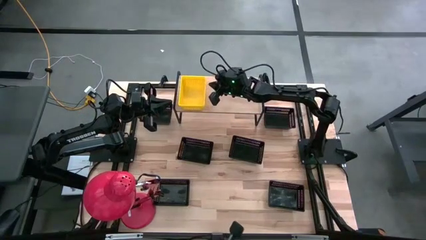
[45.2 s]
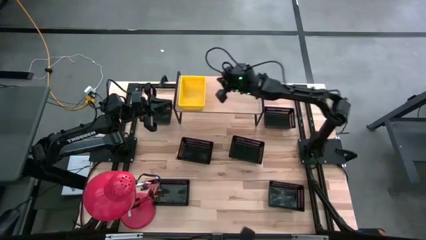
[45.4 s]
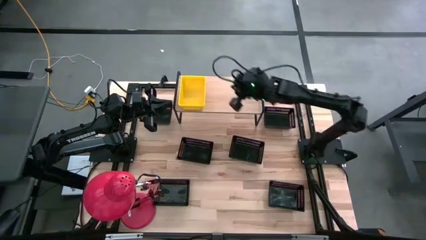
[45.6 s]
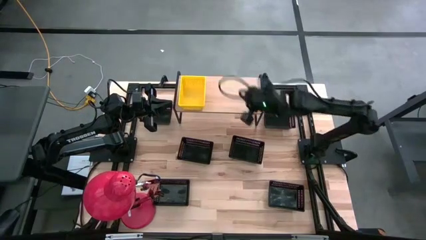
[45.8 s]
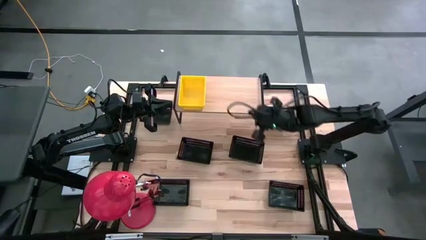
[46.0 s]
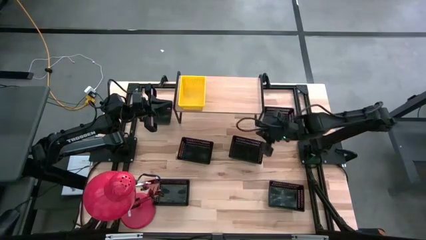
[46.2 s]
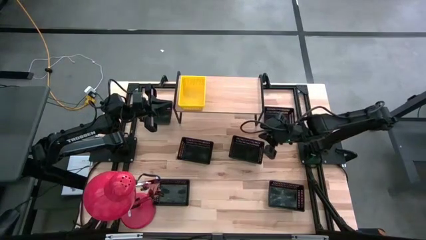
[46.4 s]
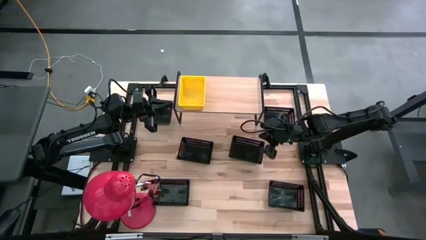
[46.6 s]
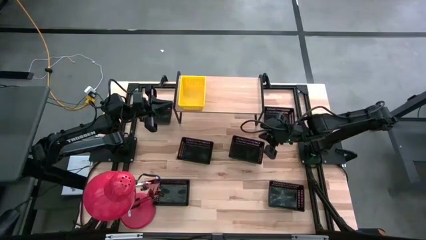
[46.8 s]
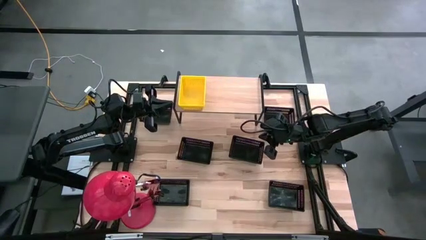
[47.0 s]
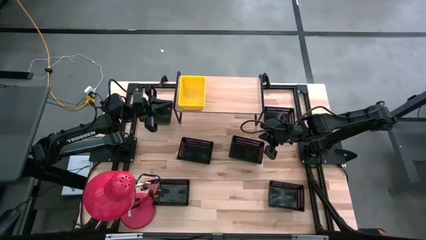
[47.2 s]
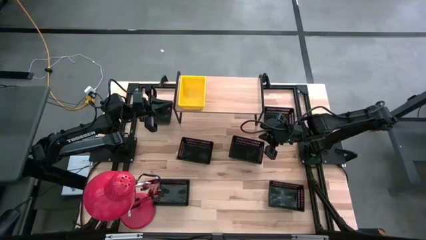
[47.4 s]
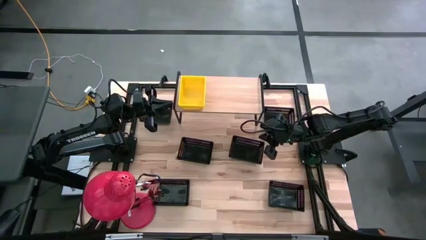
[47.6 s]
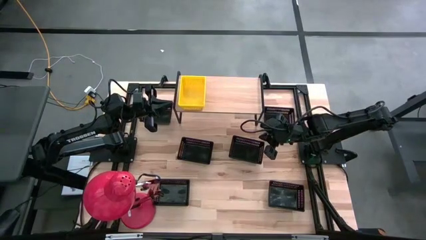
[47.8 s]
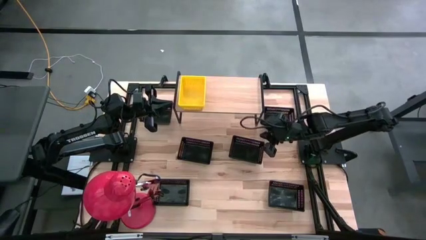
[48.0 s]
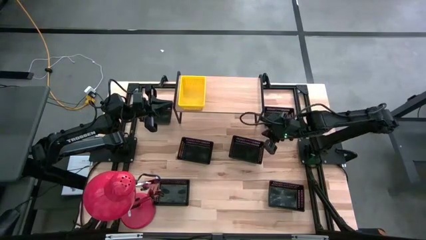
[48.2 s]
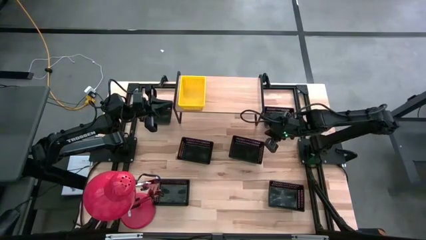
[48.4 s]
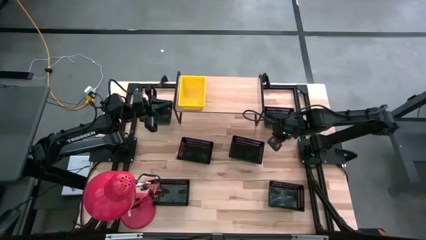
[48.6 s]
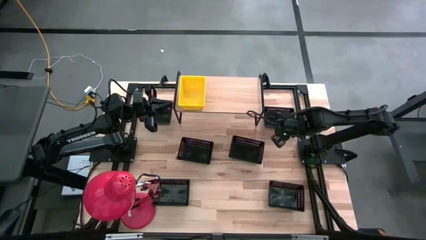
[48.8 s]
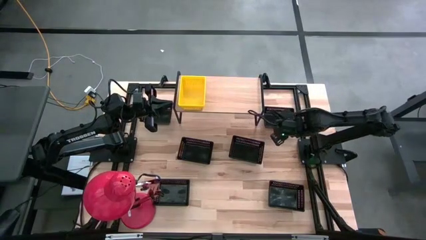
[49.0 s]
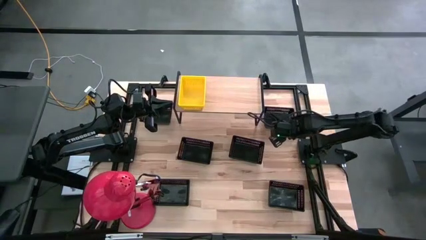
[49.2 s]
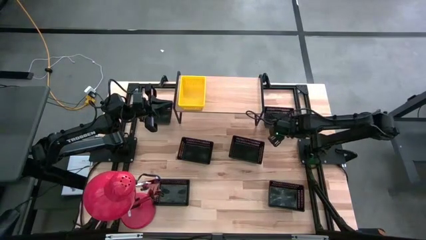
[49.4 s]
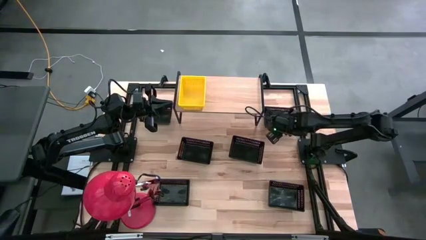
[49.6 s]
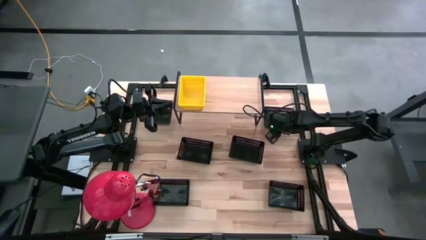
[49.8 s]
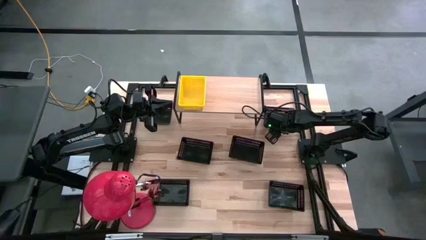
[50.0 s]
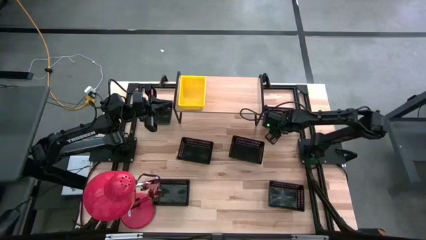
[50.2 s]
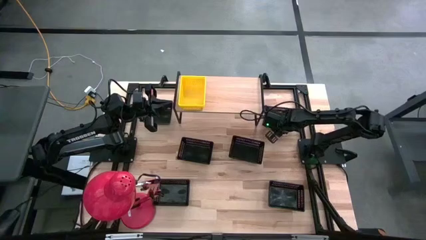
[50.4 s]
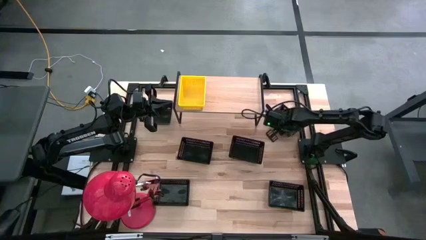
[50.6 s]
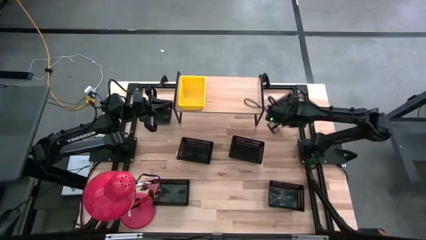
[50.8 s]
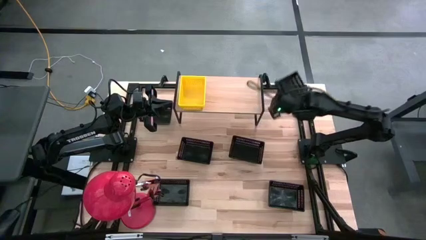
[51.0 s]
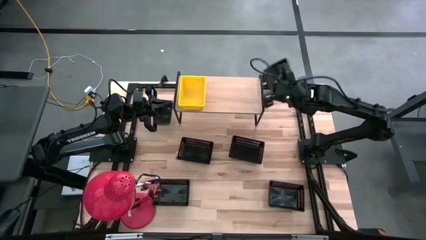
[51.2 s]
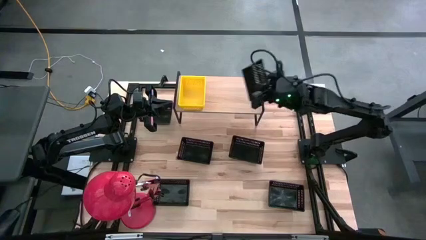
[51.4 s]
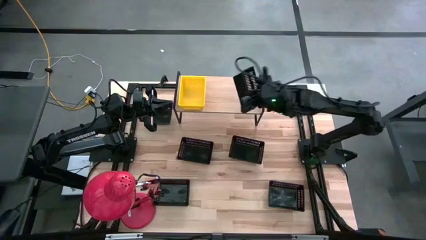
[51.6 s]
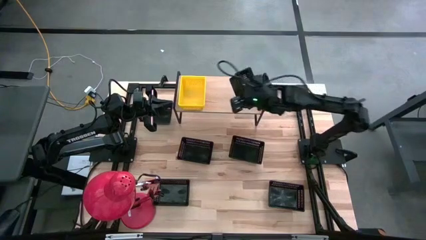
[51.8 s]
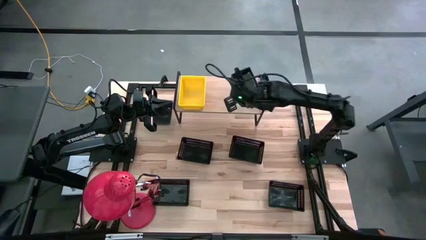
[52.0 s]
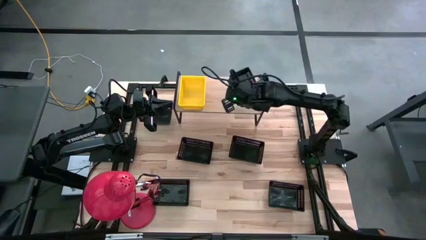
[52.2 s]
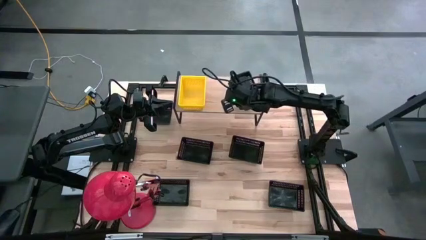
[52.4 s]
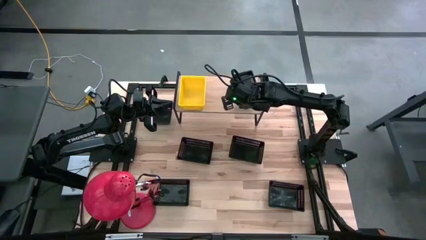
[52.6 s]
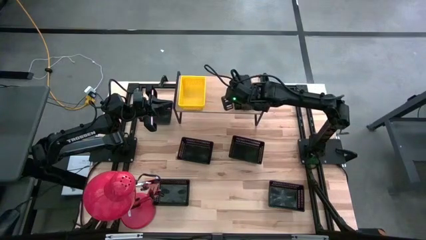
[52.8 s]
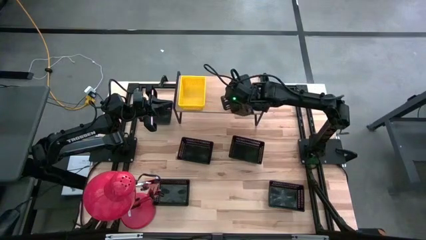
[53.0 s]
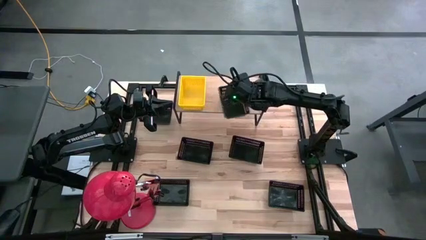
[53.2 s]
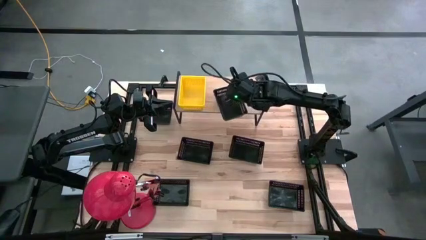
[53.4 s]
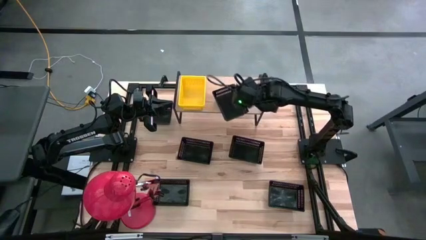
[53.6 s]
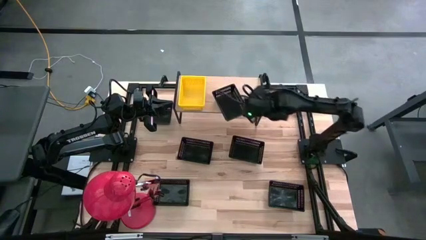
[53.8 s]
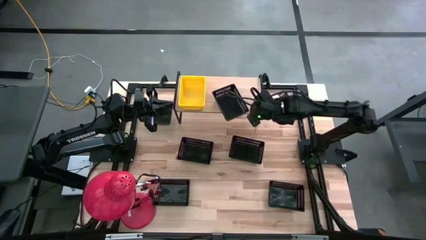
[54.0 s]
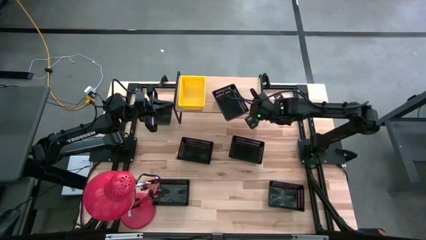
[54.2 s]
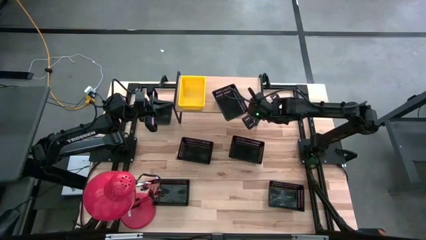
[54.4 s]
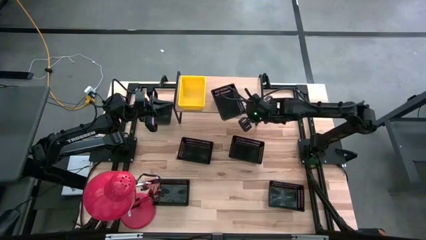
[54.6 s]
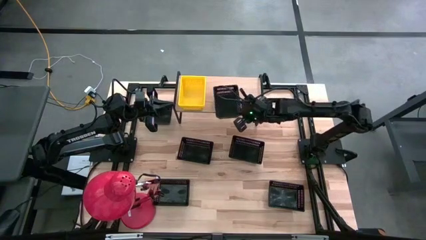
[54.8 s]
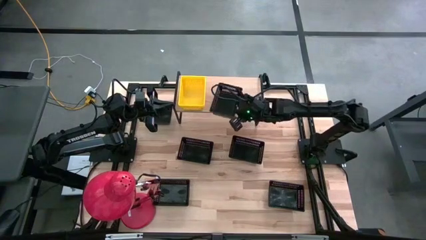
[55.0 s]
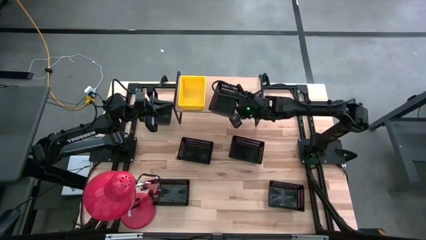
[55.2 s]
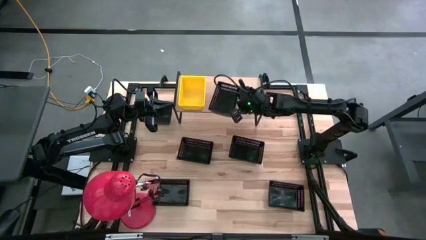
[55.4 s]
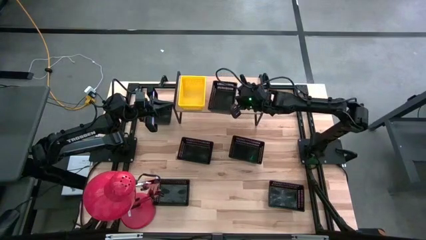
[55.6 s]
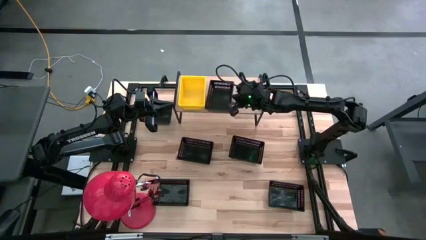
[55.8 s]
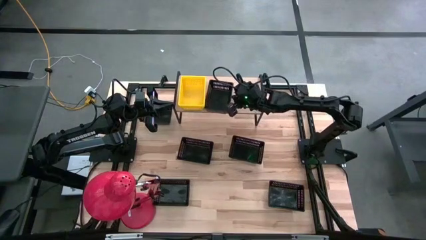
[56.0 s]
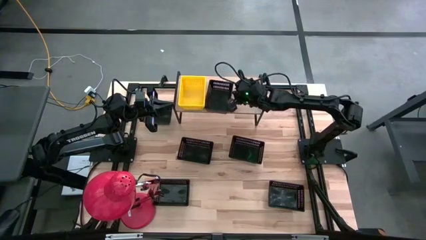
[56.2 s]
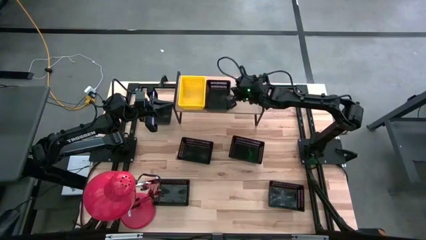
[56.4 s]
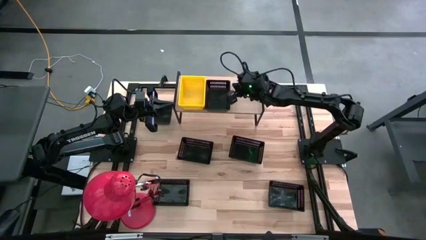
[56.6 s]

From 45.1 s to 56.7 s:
Task: Stack baskets on shelf by color
Put the black bin on the shelf
